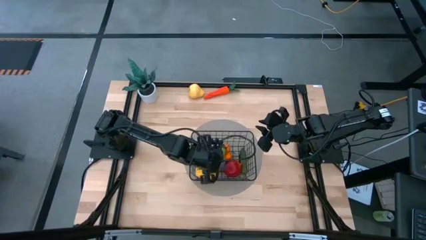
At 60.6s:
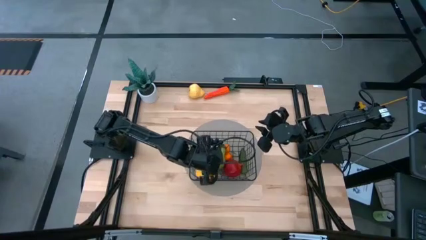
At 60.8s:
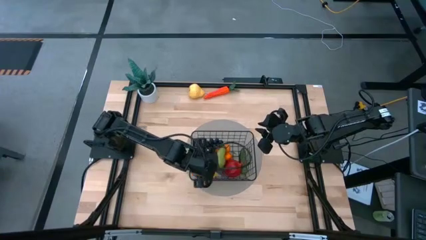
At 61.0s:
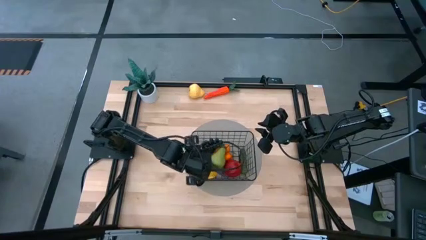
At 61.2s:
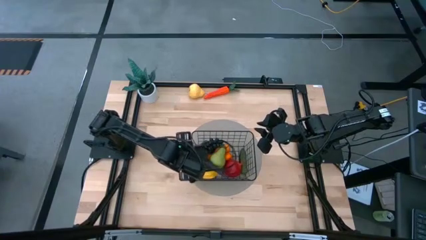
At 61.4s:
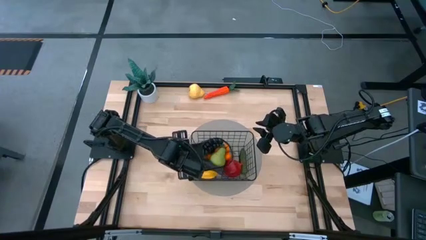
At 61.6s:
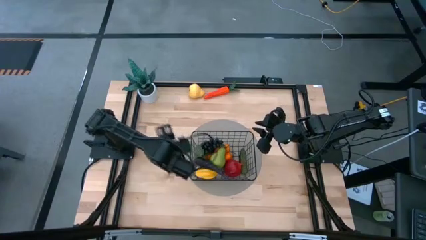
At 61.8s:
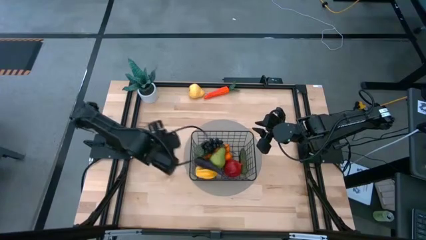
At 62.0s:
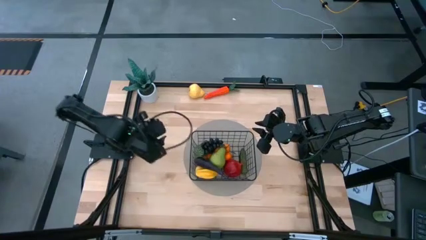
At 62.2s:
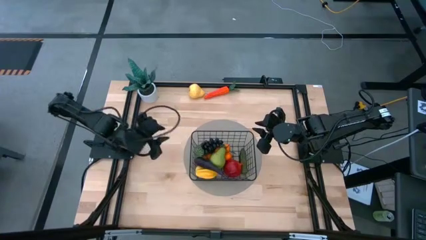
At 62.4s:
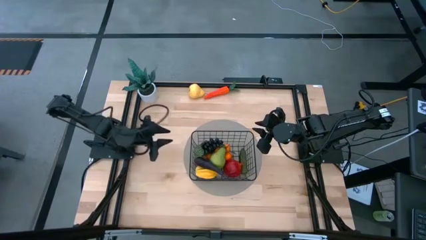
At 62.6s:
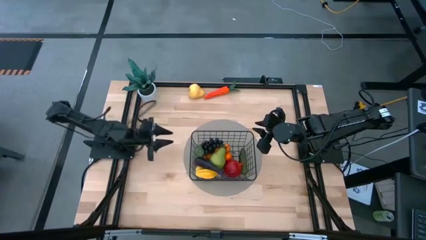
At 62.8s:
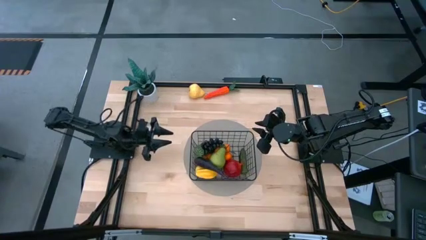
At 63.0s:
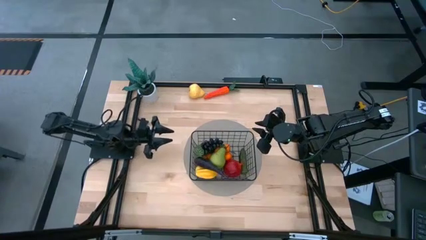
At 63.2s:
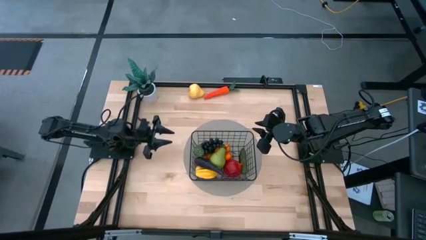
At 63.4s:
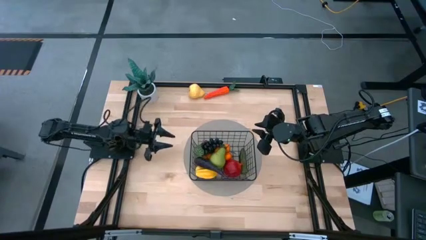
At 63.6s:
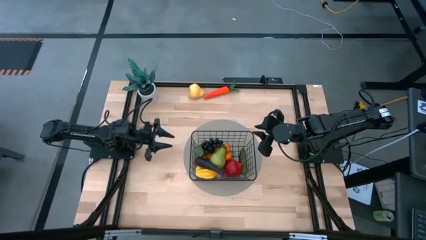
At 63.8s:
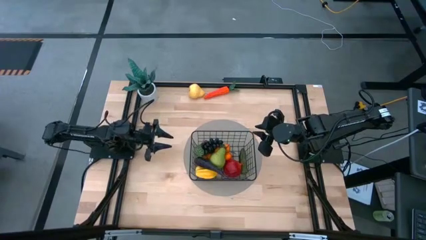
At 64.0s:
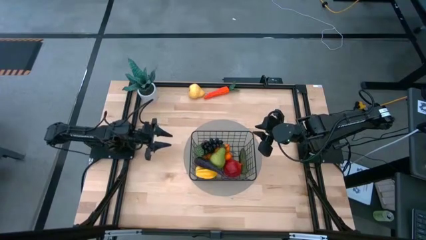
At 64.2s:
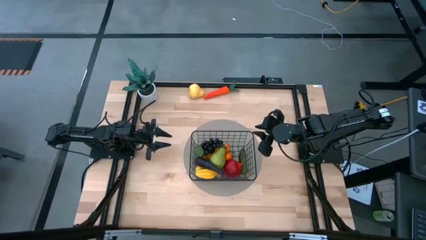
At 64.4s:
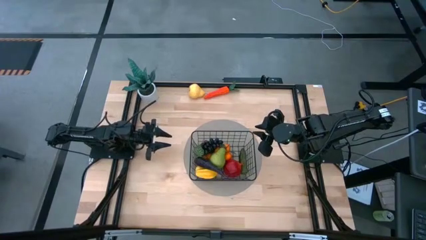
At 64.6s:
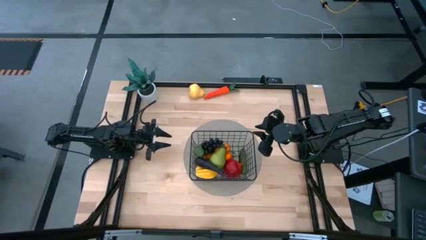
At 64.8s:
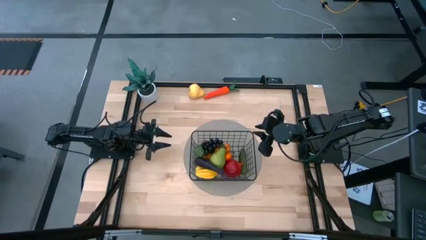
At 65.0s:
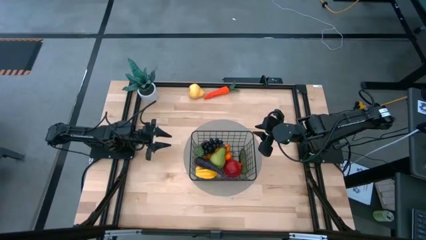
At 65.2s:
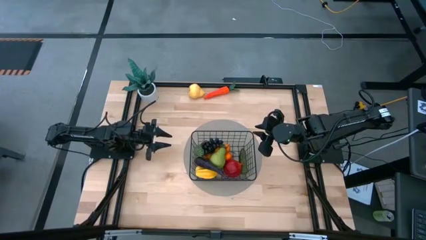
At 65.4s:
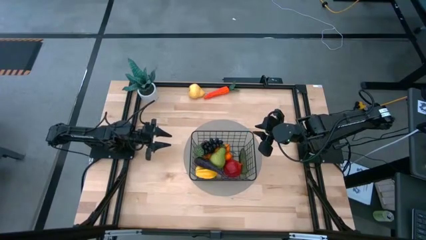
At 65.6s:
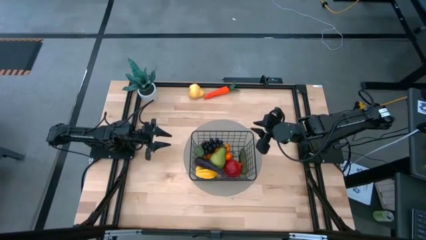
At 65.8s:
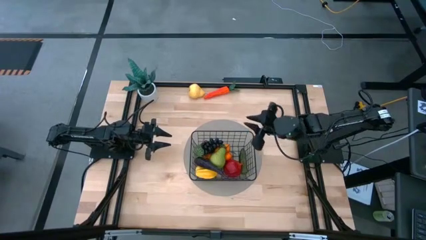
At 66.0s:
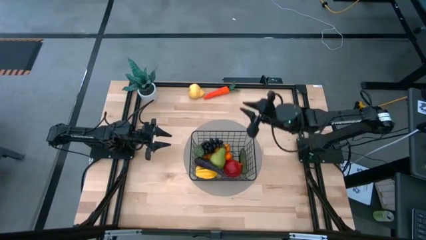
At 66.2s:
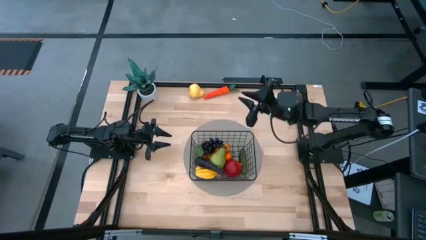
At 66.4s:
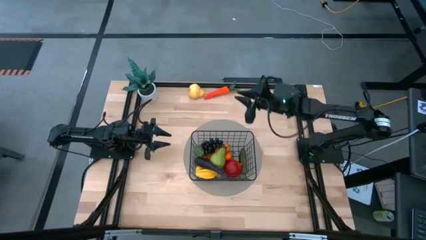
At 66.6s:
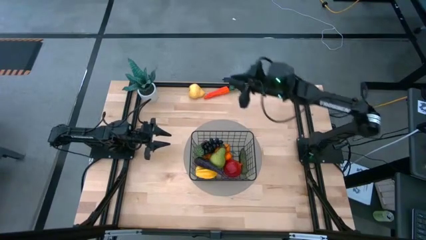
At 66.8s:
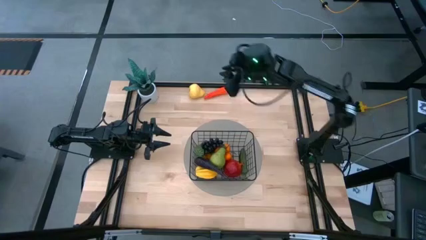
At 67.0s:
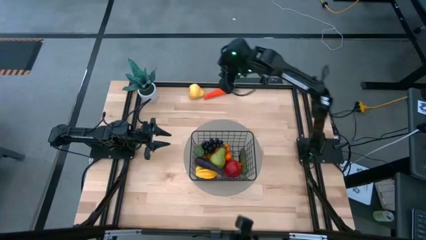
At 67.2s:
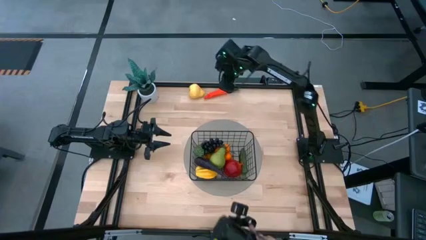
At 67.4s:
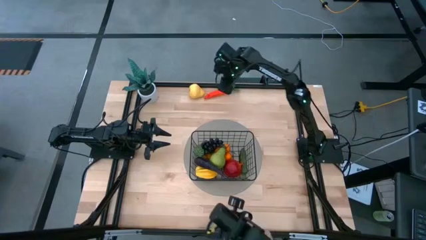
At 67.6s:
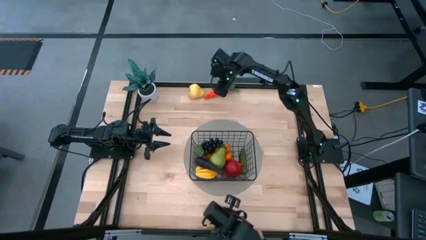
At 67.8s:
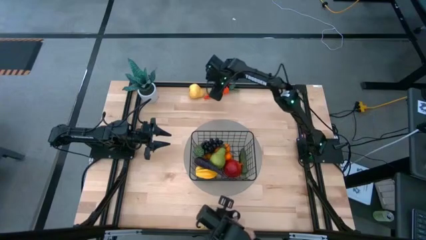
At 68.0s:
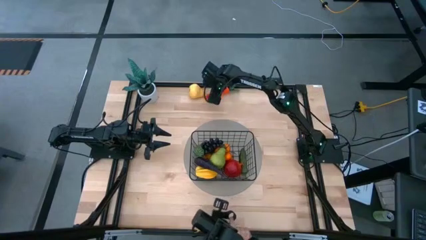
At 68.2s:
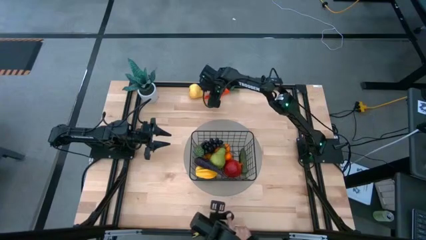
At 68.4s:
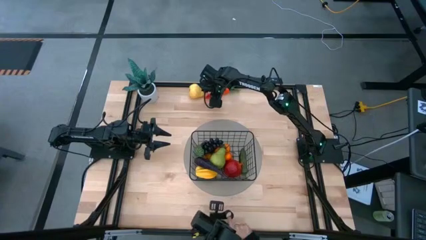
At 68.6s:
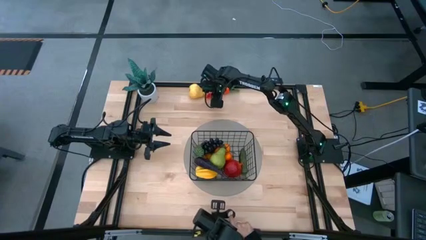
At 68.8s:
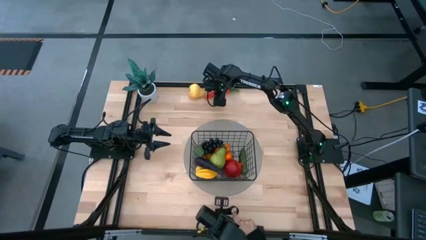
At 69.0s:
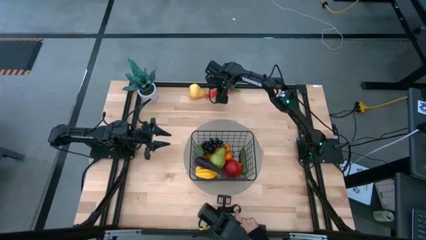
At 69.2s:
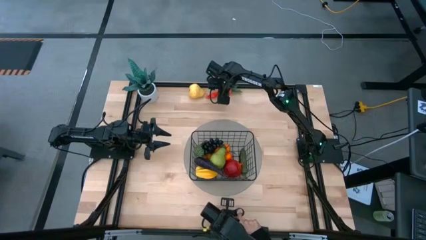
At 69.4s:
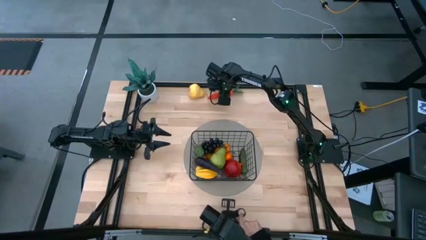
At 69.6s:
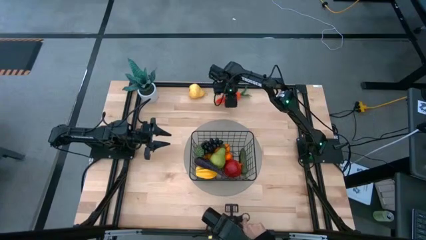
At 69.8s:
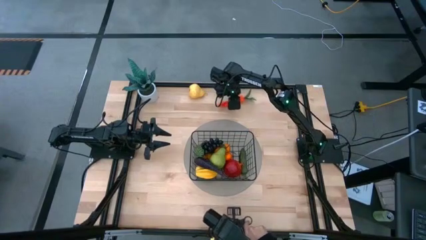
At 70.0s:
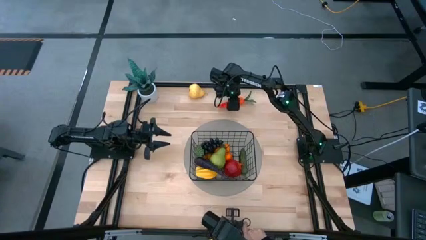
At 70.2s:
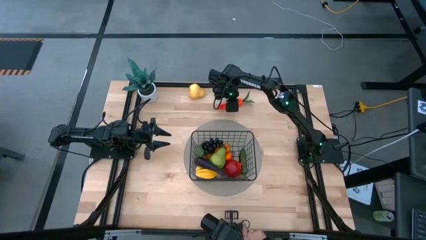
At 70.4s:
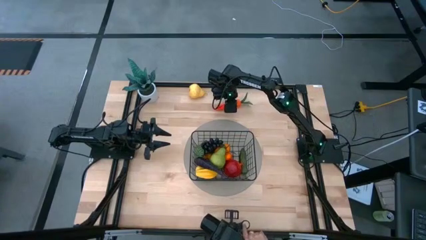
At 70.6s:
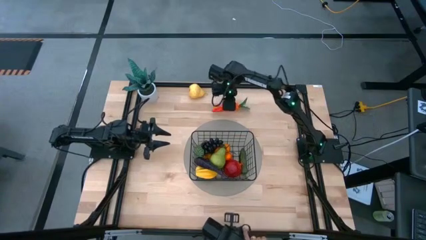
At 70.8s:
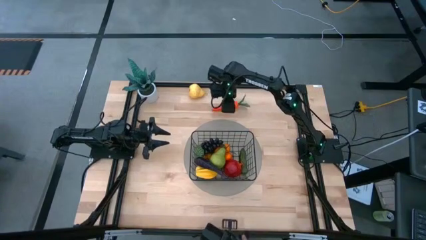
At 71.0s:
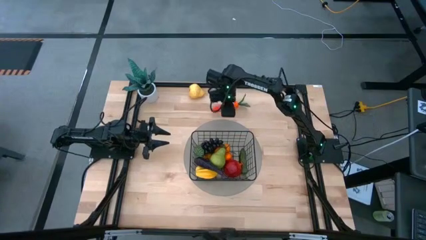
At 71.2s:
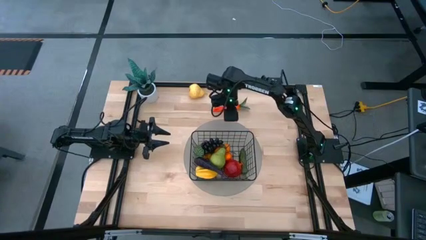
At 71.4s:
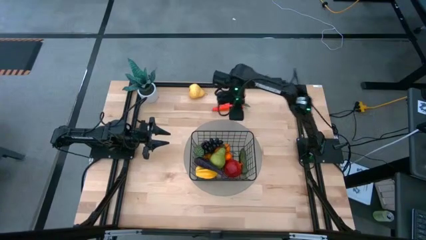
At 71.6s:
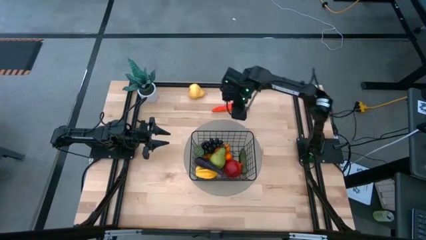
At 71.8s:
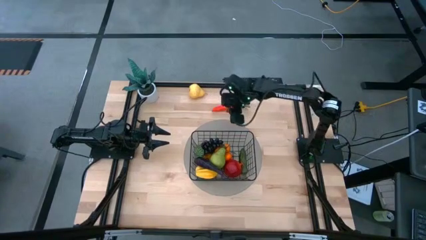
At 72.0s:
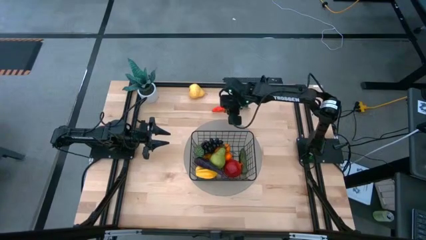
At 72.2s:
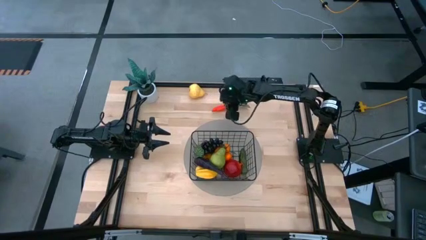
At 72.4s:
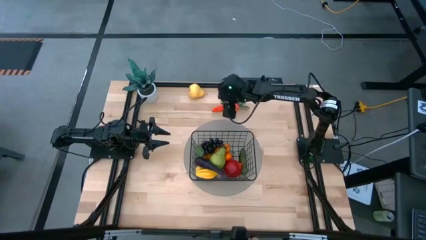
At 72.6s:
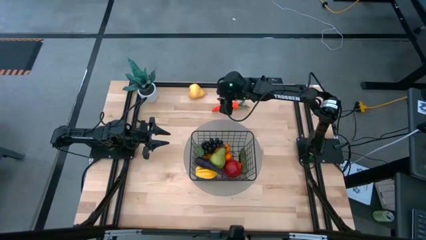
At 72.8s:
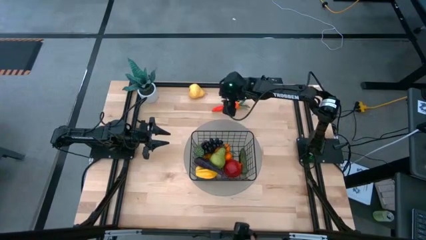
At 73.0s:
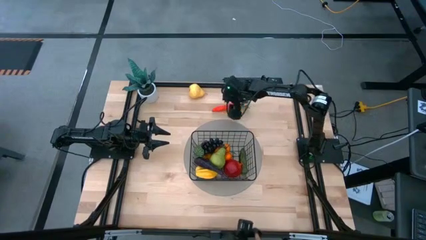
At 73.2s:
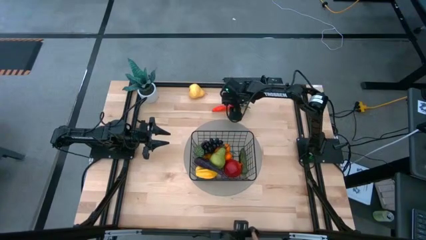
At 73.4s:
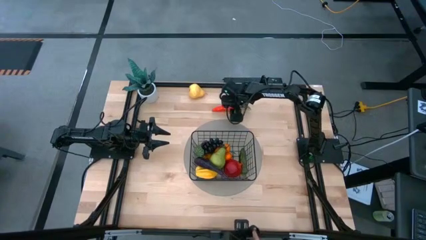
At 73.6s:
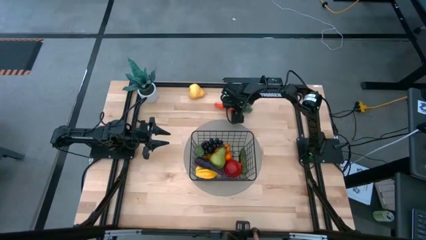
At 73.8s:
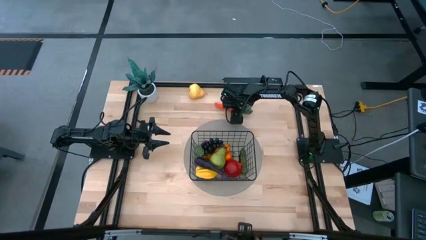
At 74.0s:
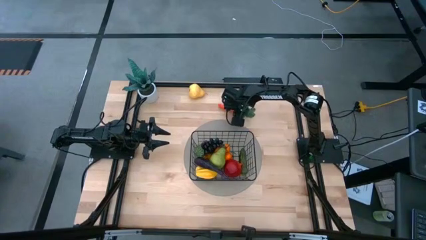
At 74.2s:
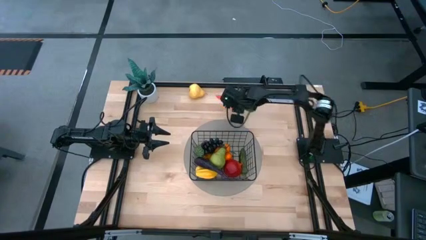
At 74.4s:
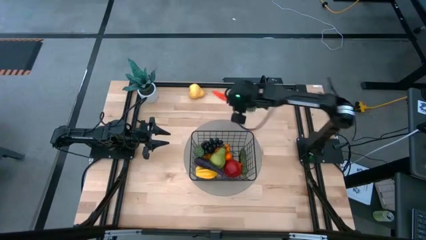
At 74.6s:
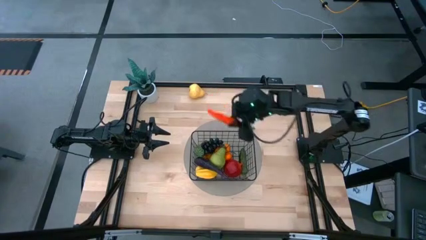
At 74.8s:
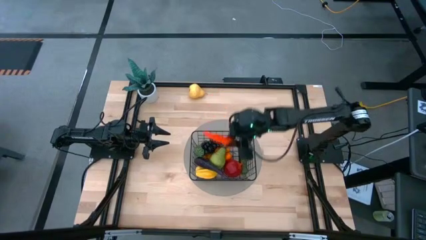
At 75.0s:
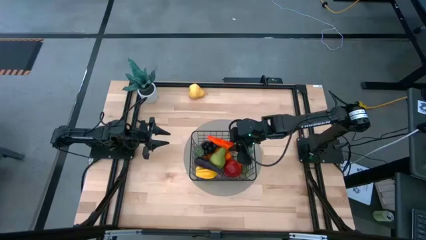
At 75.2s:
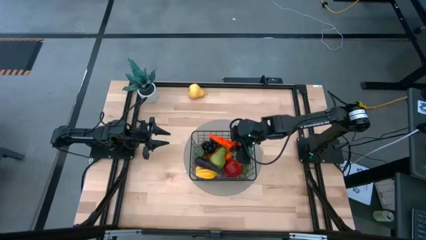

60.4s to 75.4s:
Task: Build produce basket
Put the orange carrot into the black wire basket
